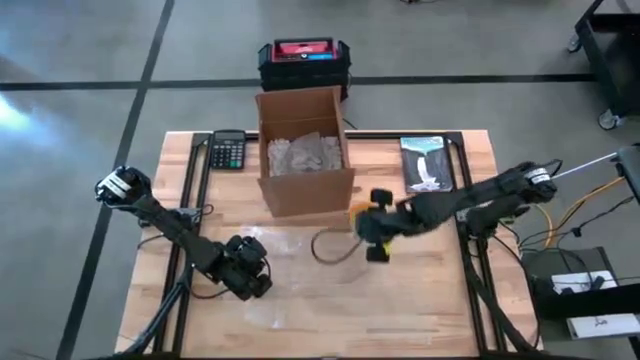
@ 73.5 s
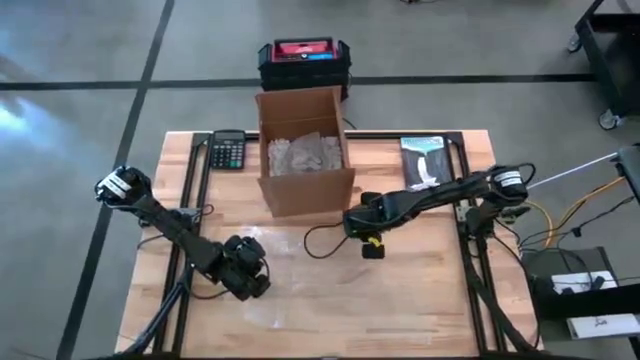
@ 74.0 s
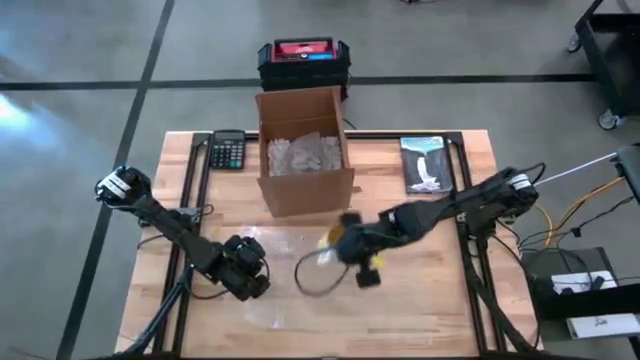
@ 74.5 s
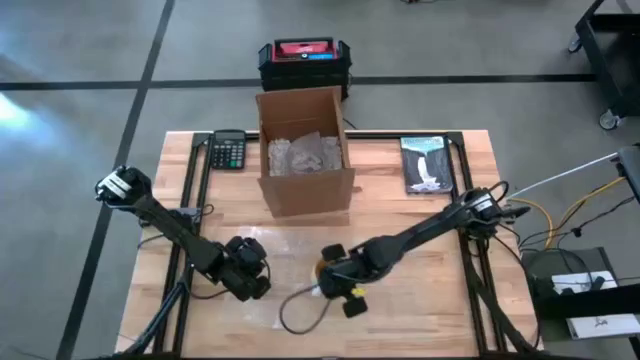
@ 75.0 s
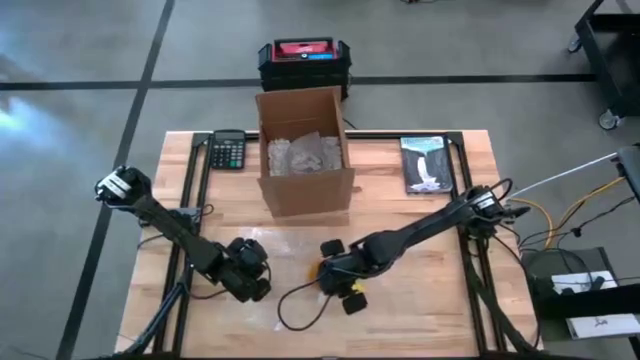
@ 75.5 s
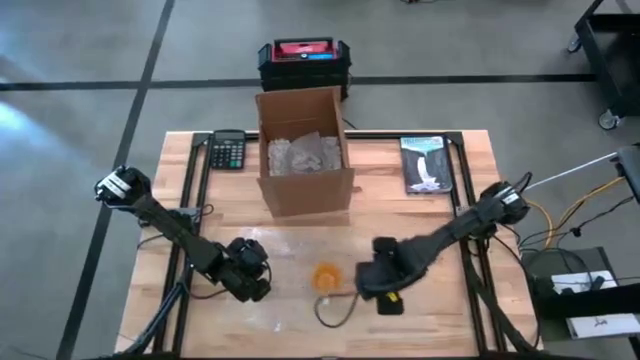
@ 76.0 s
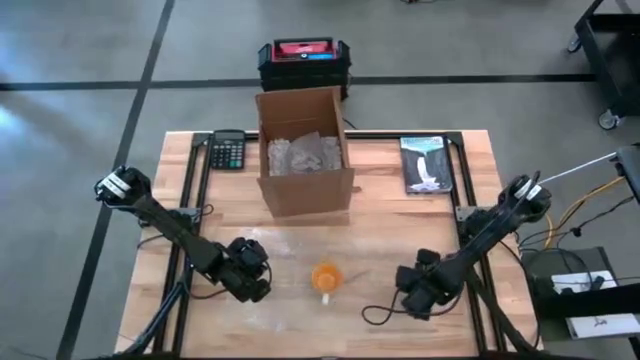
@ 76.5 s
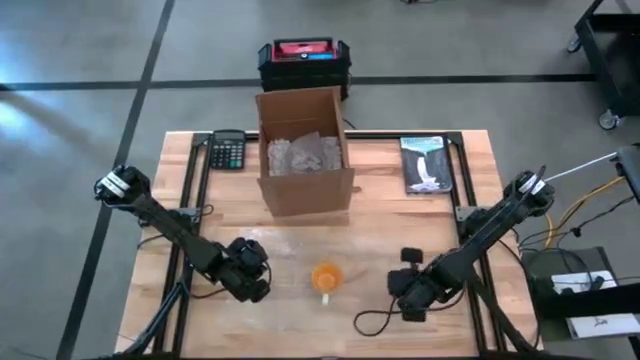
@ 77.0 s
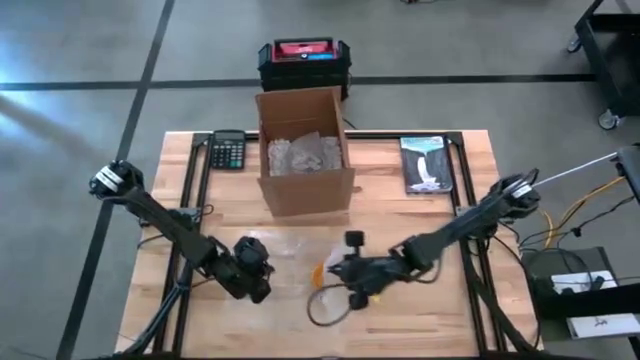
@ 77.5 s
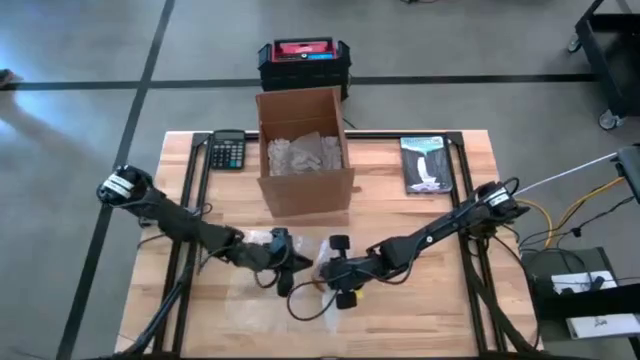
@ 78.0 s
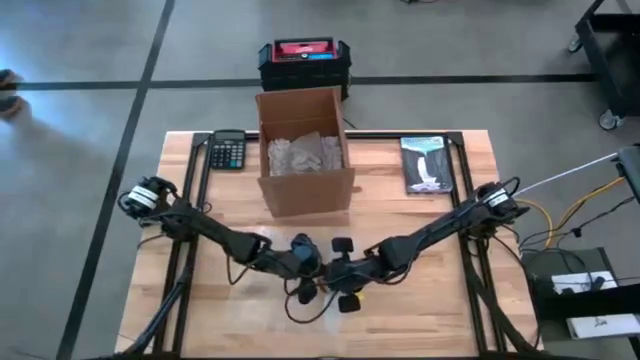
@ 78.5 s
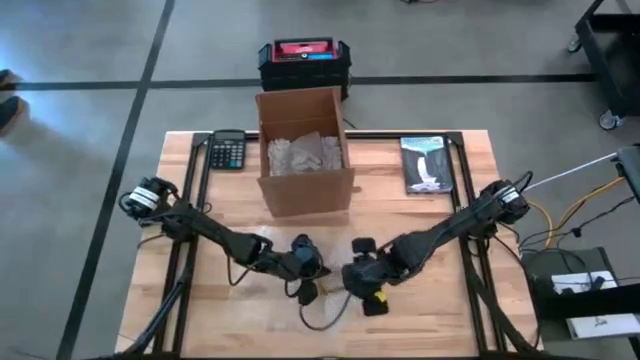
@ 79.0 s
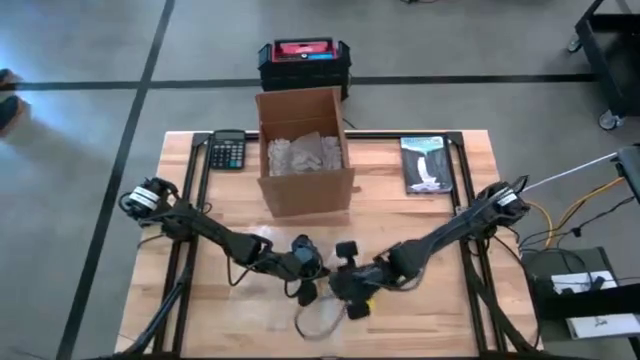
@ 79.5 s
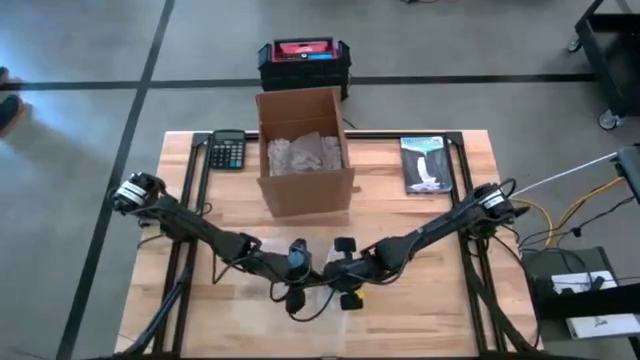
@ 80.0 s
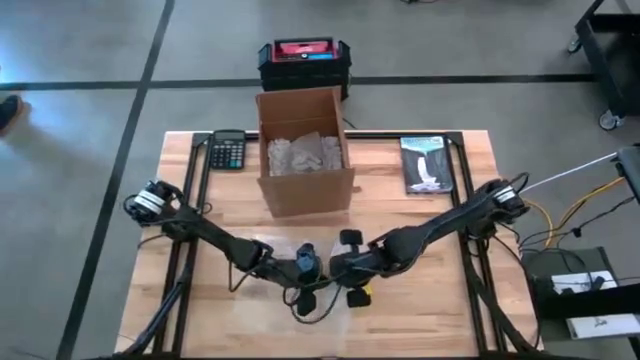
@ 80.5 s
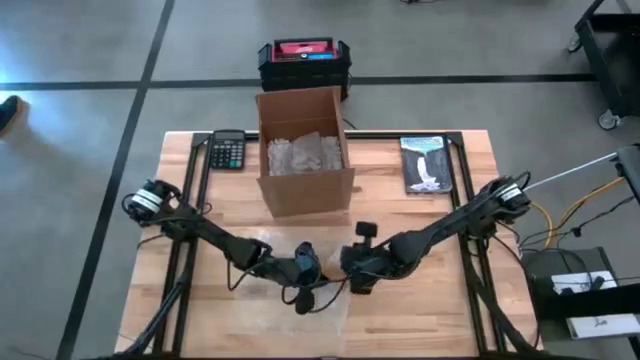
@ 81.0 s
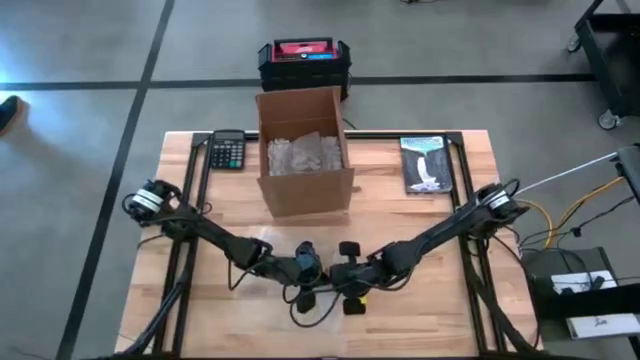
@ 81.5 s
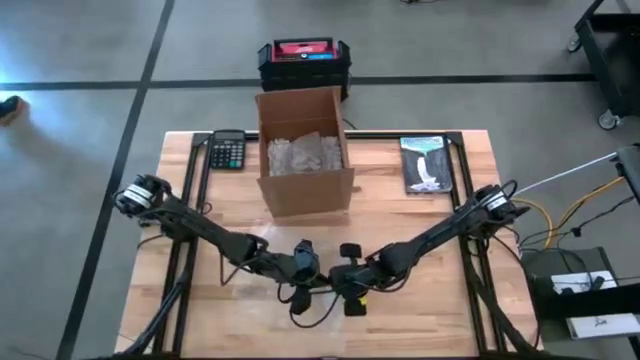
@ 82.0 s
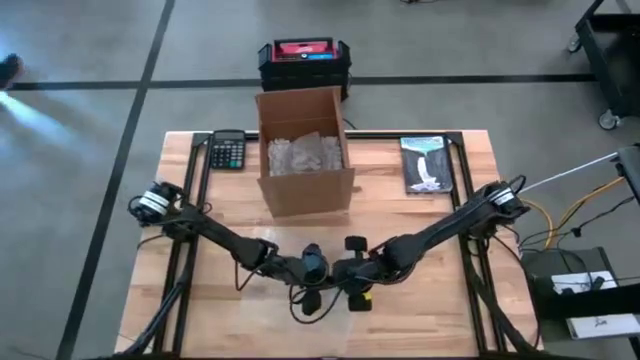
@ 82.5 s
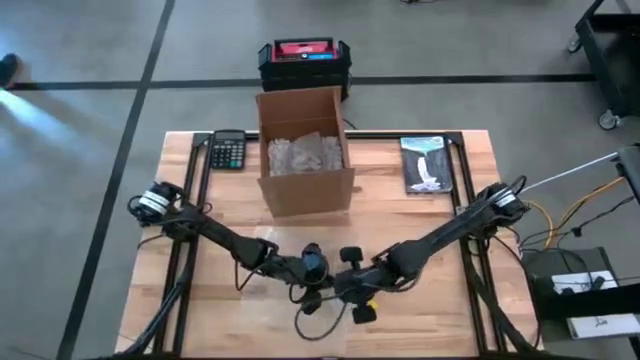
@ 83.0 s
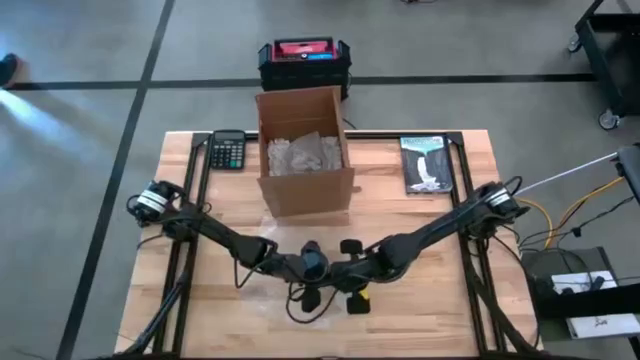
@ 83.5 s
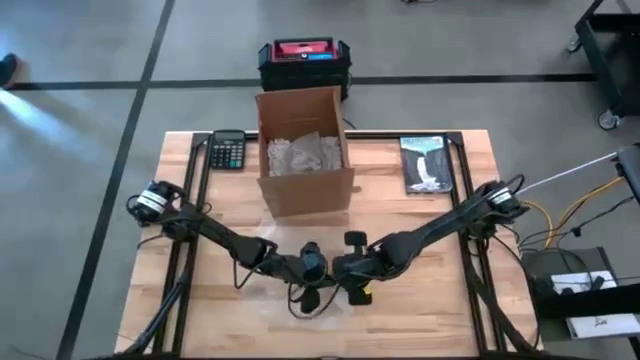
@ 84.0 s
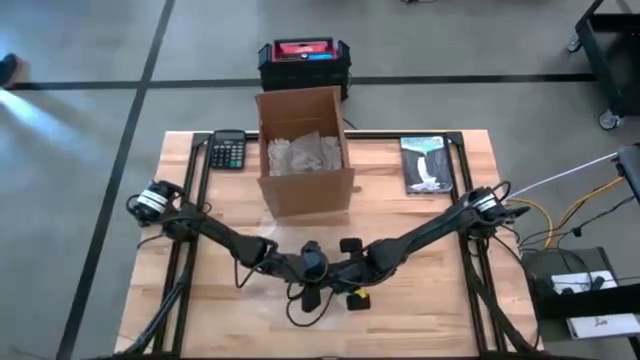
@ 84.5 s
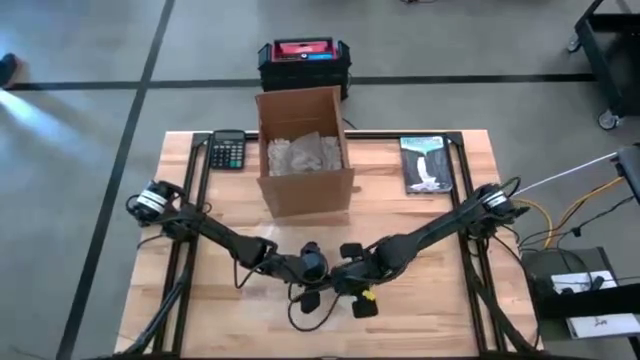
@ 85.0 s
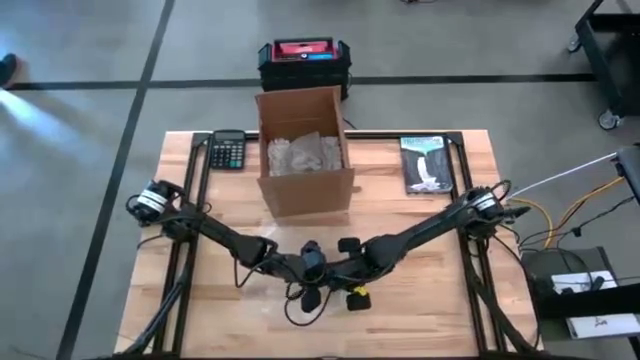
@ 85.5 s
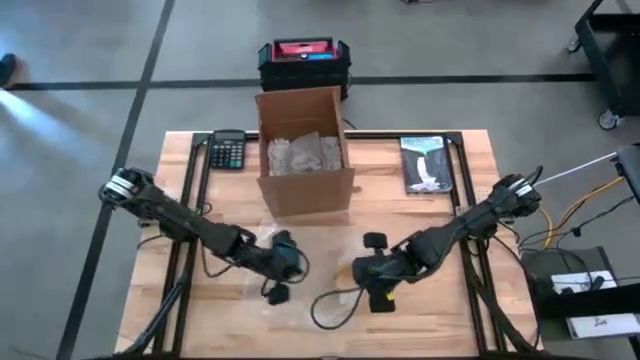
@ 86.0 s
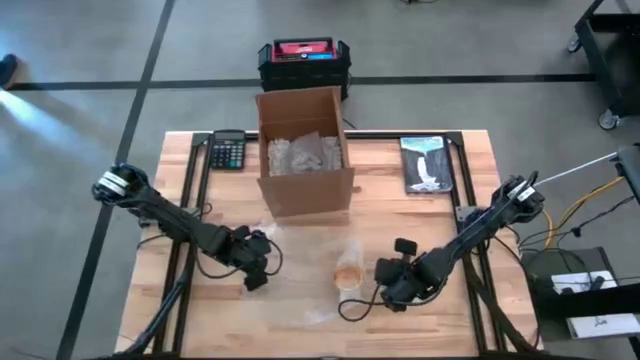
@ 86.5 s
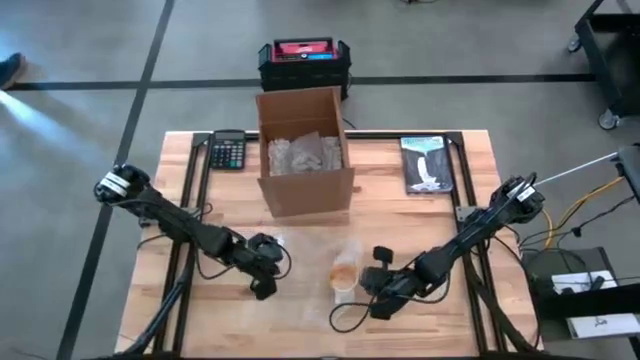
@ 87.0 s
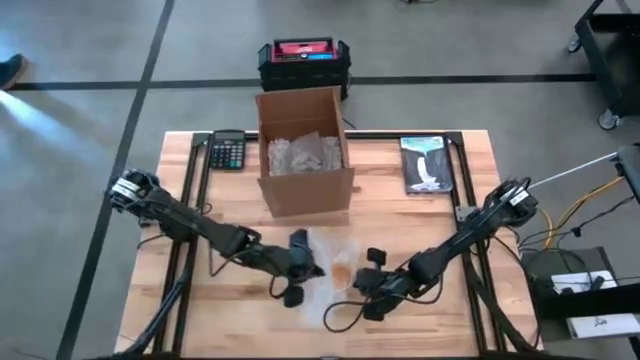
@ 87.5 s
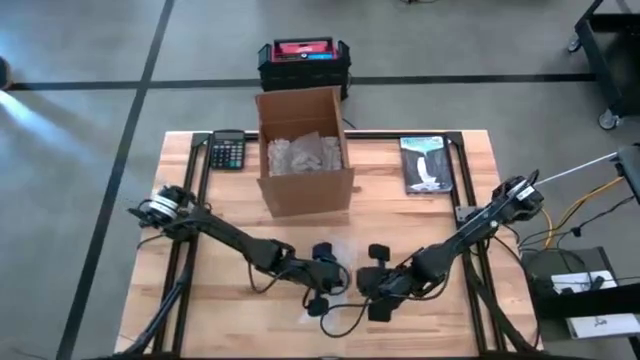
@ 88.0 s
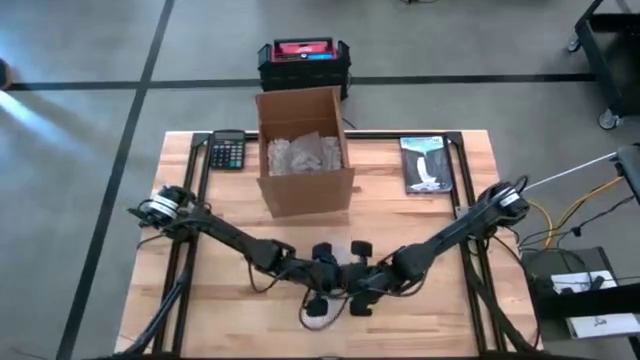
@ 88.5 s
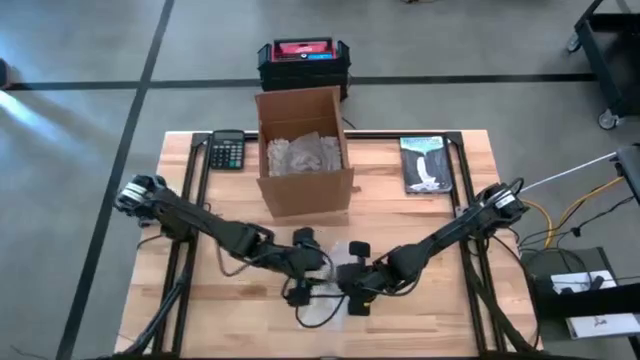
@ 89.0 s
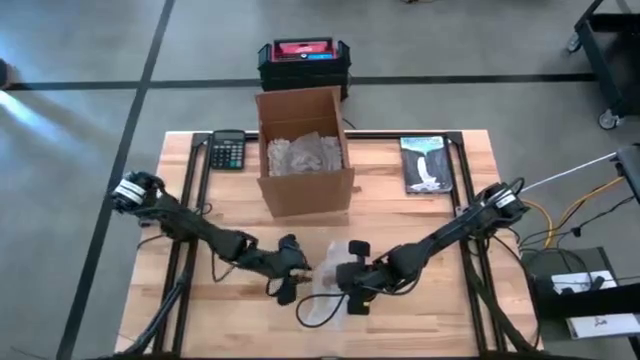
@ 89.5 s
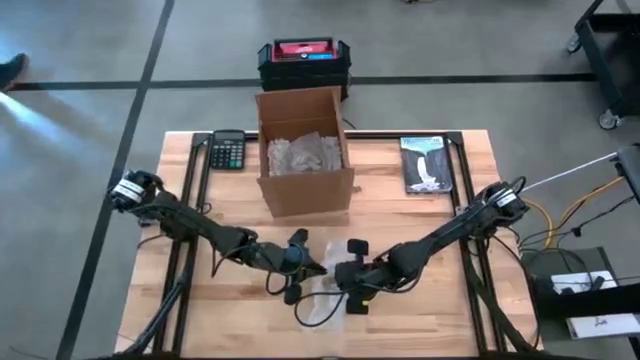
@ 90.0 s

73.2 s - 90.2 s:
Task: wrap mug
Wrap the yellow mug with the transparent bubble wrap

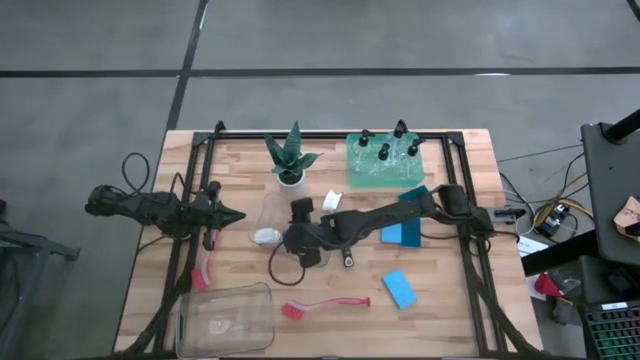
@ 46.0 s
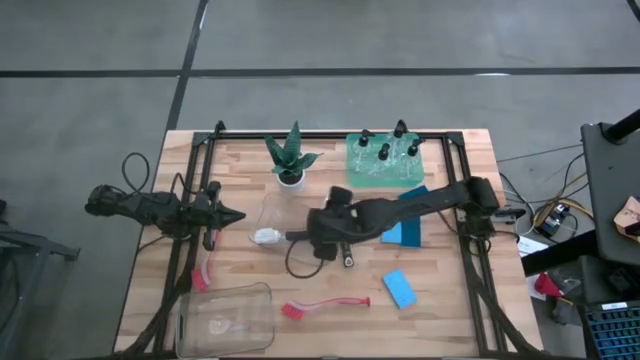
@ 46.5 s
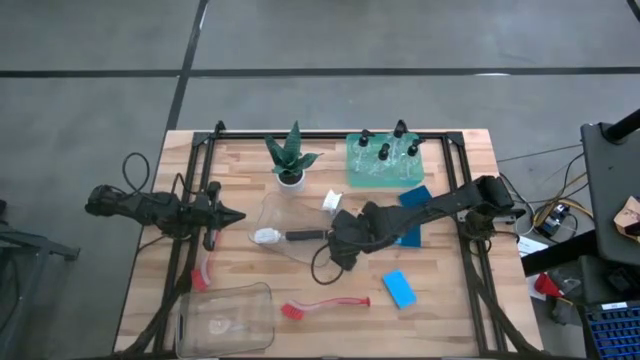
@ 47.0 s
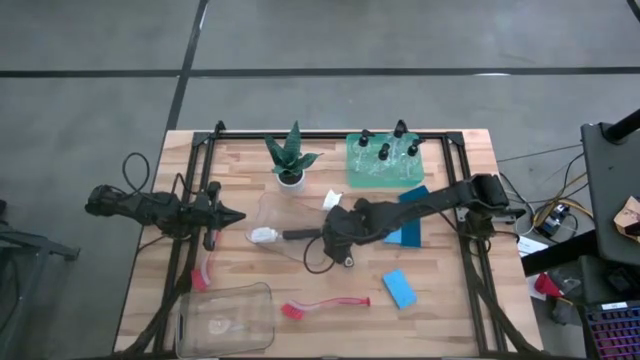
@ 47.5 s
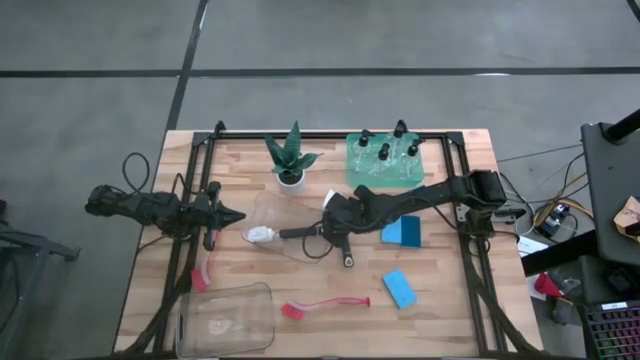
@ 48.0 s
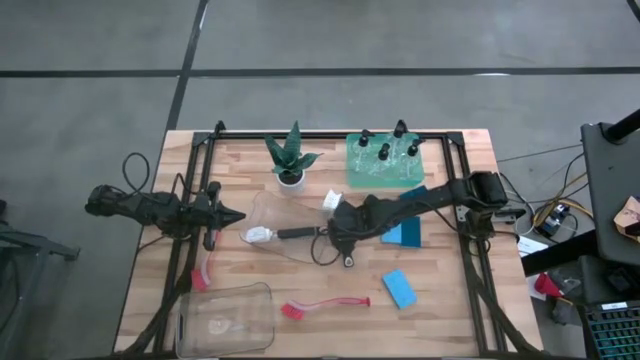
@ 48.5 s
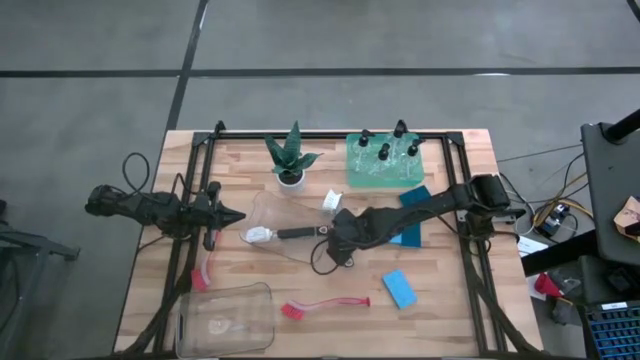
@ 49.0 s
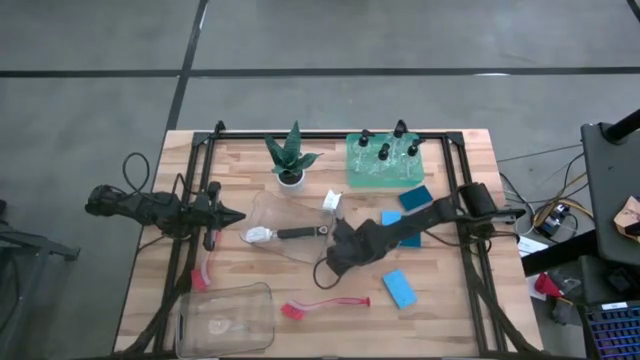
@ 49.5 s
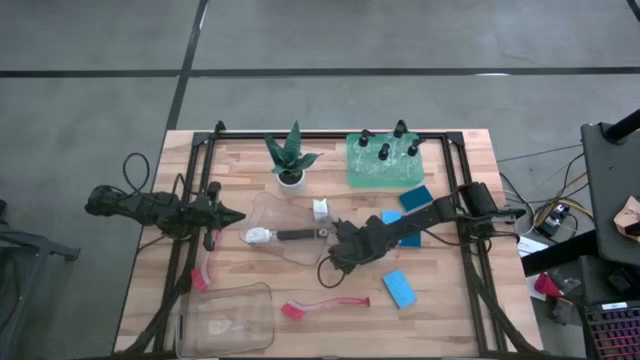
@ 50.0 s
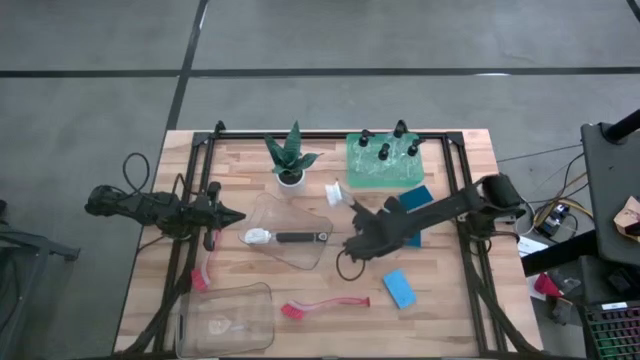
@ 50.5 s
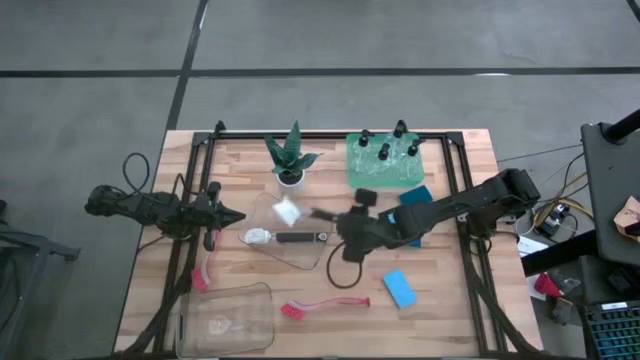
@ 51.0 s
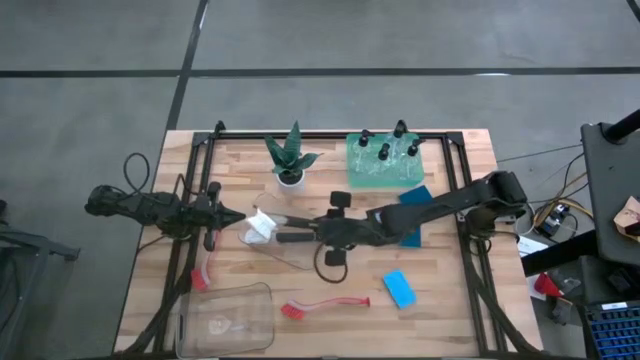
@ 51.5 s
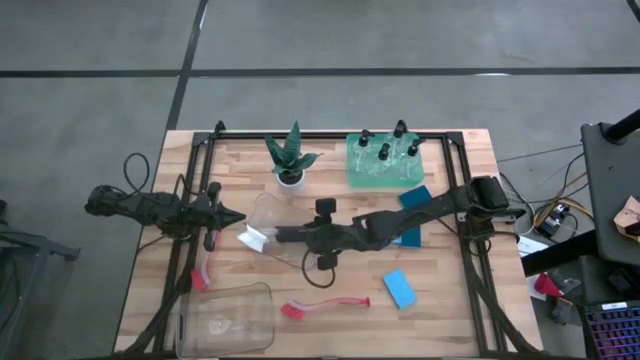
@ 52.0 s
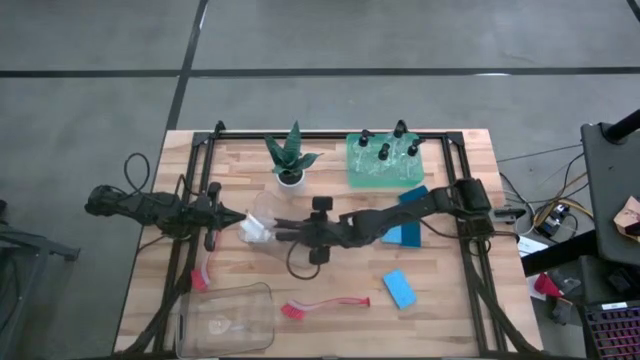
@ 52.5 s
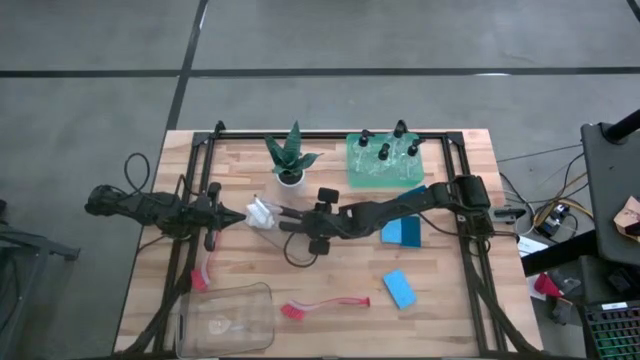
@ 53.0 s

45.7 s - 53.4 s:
Task: Pick & Place Kitchen Sink Supplies
Put the black dish brush into the top transparent bin
